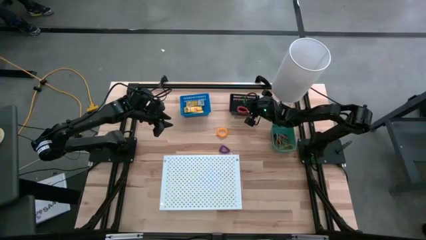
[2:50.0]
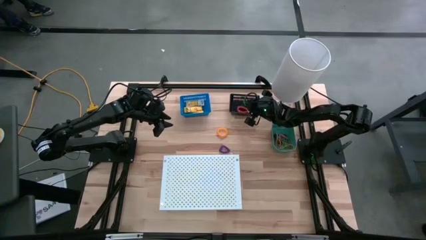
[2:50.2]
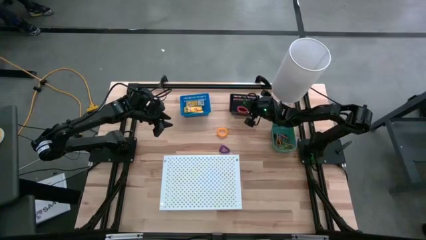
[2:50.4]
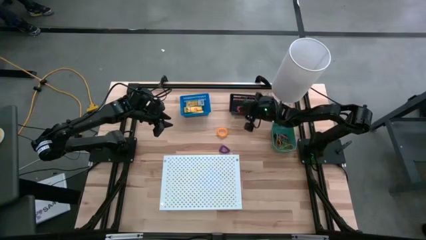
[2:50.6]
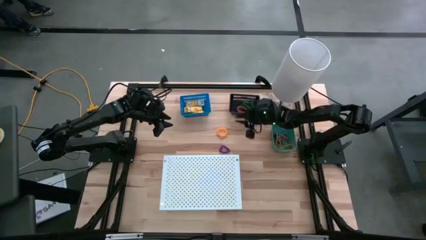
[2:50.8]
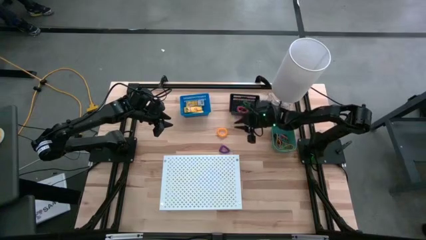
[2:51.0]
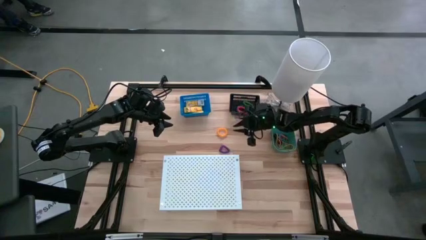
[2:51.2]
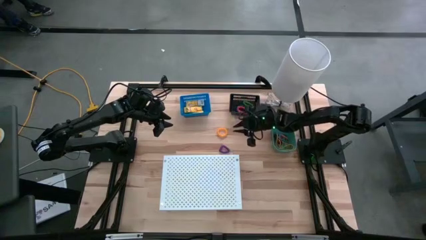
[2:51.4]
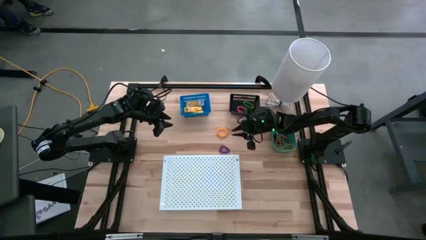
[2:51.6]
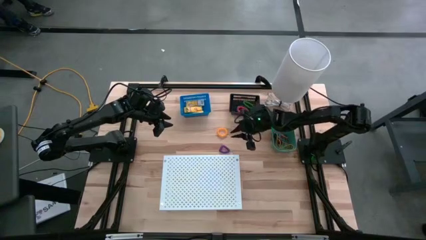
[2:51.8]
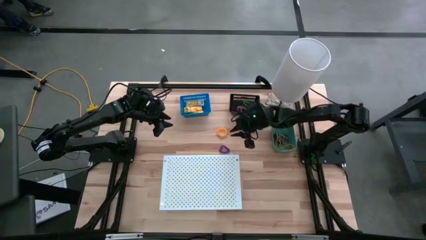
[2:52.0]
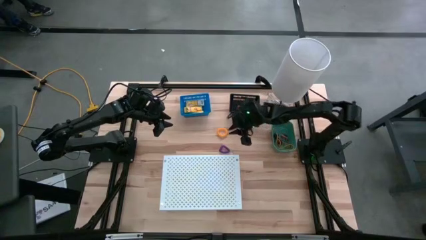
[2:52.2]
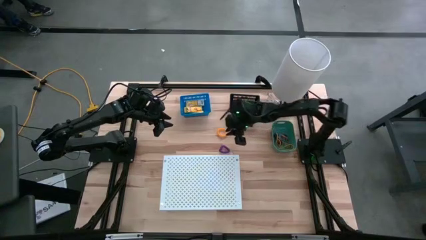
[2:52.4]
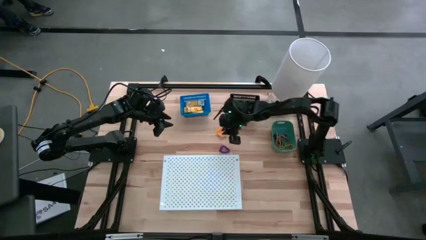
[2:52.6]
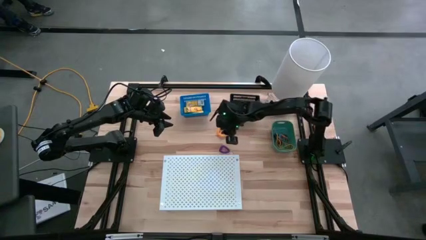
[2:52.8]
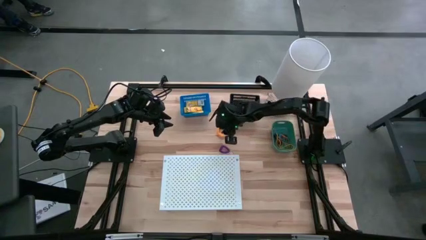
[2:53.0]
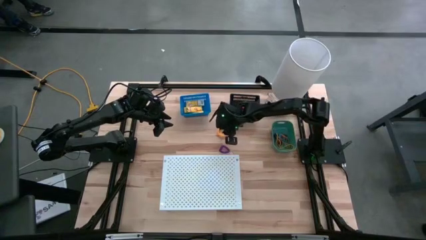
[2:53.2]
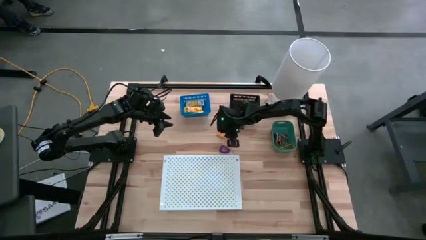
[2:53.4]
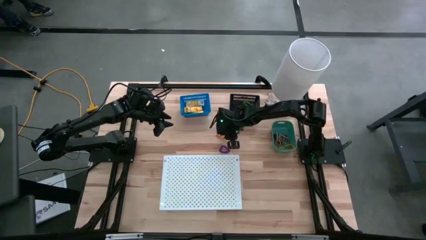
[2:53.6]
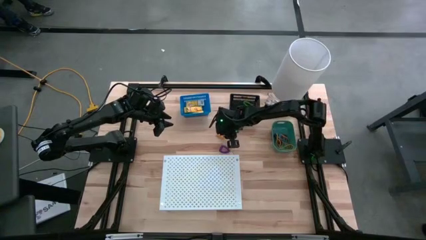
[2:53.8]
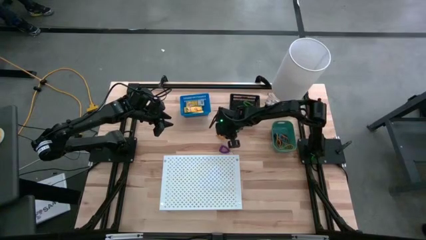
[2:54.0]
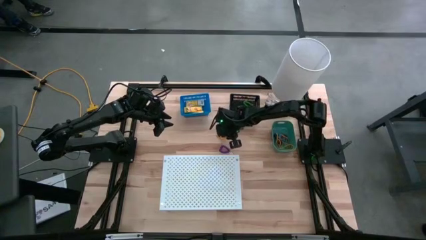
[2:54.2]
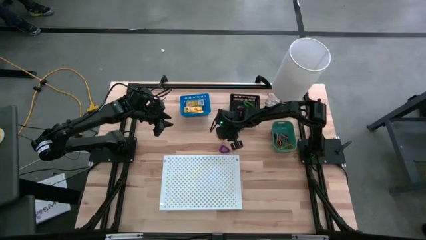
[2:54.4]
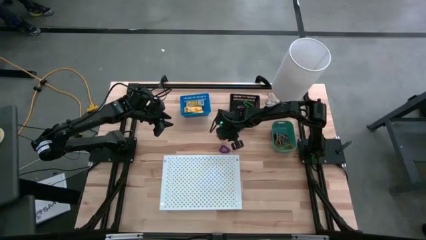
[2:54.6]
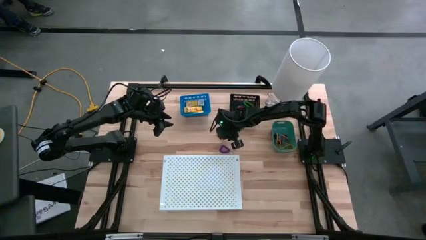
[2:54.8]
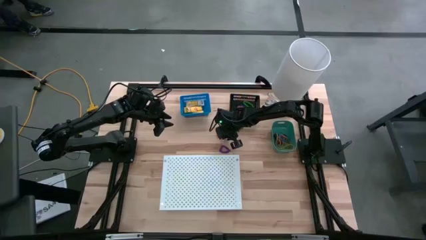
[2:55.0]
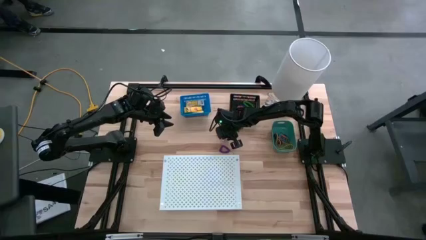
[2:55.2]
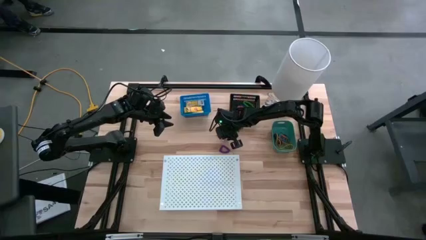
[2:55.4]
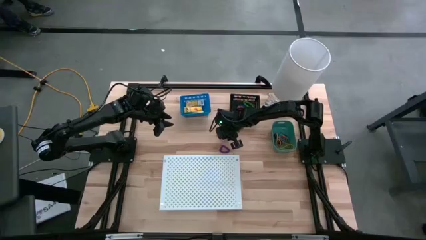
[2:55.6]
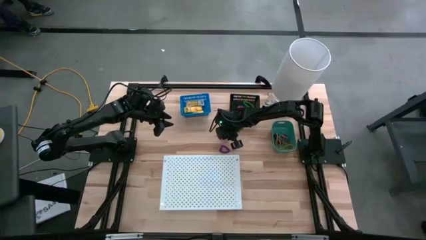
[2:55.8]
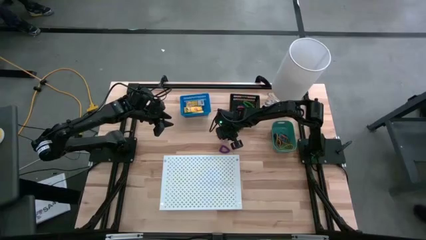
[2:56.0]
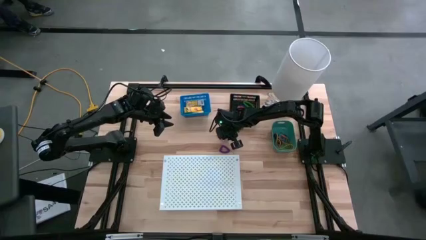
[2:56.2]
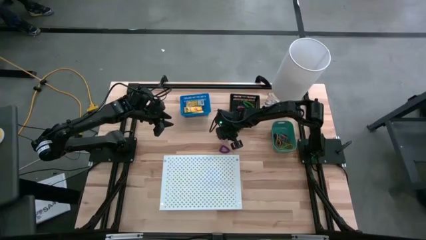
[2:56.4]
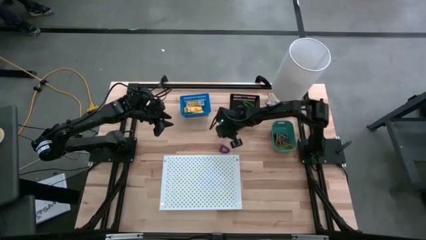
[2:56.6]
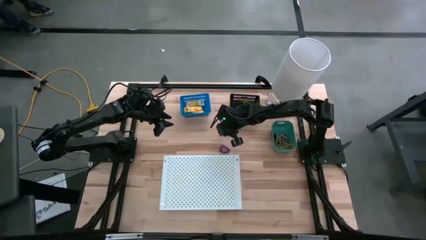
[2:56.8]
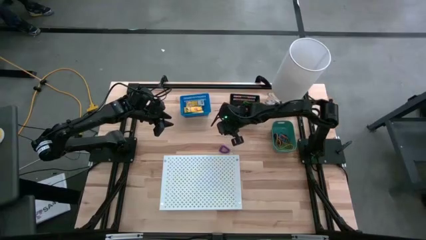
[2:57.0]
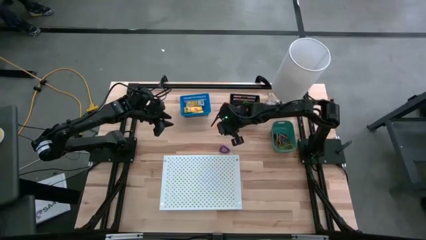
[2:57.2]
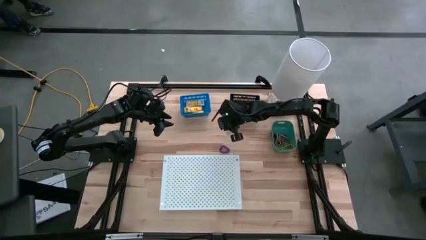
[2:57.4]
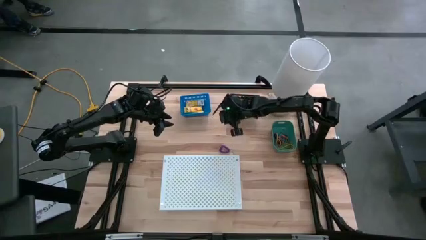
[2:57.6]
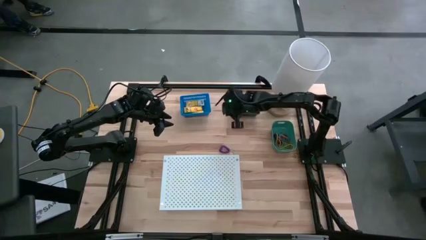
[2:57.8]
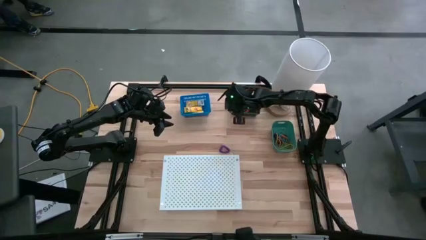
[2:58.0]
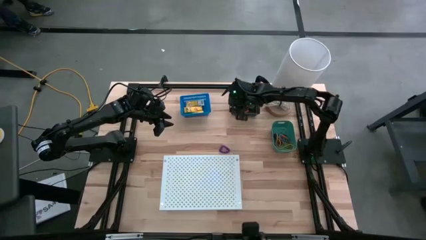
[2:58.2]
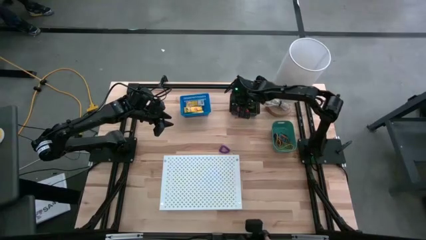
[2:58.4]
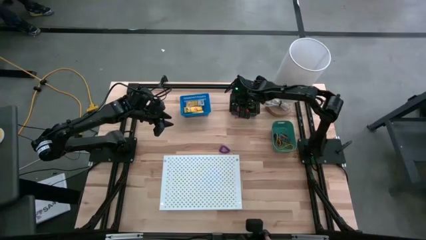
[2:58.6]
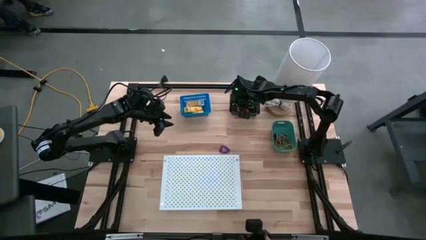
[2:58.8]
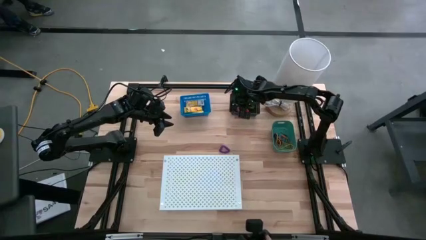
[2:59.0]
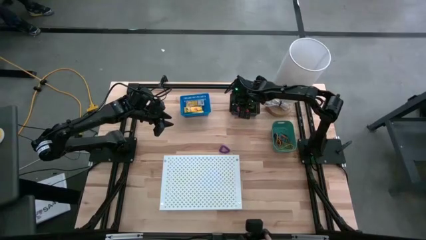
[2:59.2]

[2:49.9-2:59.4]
Task: Pick & Place Office Desk Supplies
Put the yellow spring keychain into the black bin
